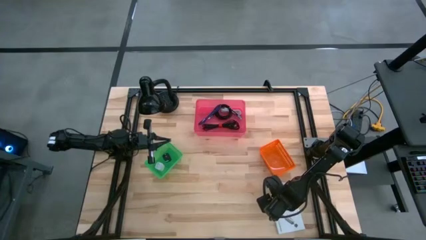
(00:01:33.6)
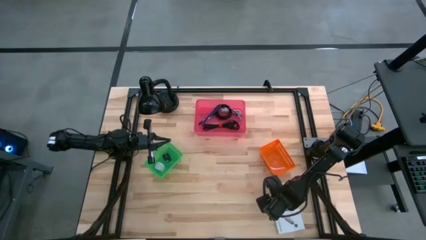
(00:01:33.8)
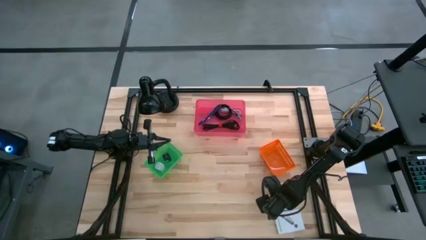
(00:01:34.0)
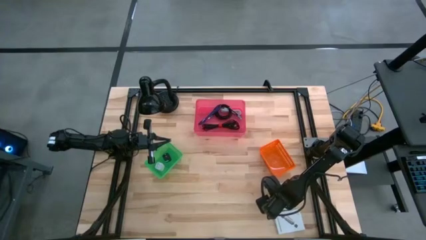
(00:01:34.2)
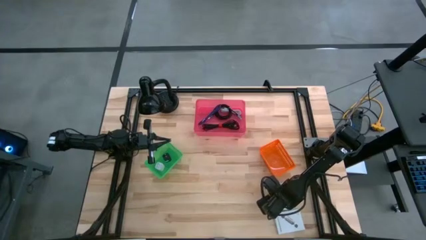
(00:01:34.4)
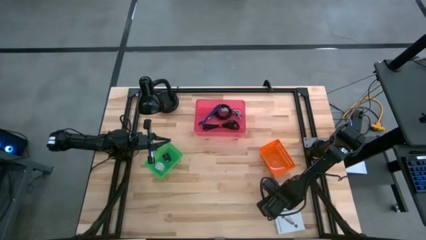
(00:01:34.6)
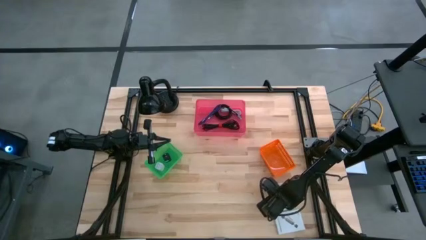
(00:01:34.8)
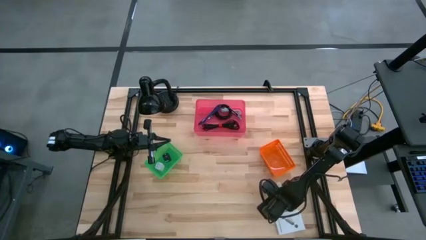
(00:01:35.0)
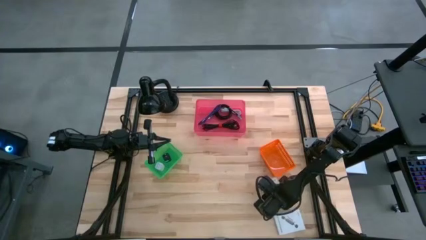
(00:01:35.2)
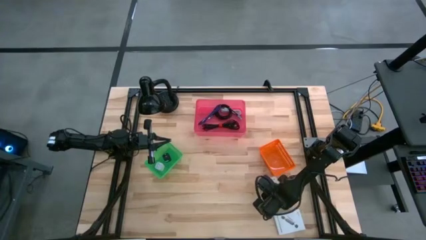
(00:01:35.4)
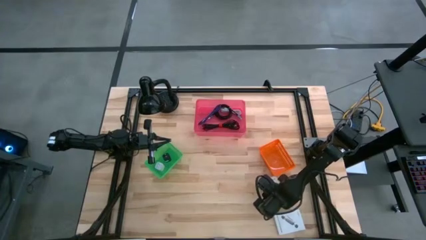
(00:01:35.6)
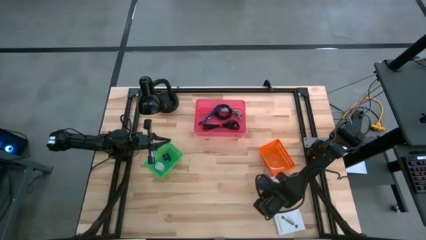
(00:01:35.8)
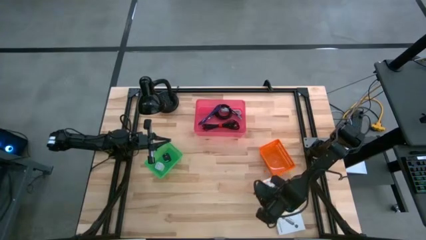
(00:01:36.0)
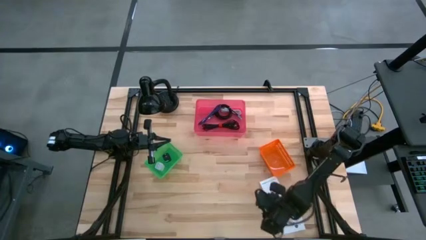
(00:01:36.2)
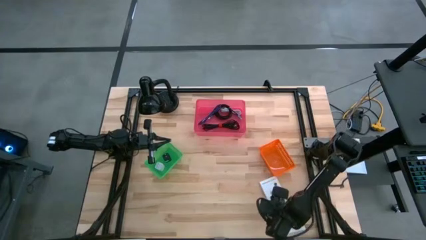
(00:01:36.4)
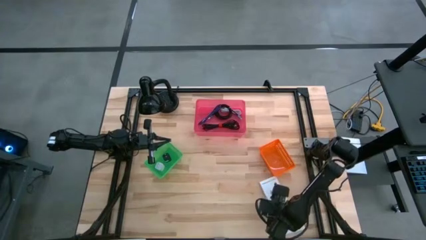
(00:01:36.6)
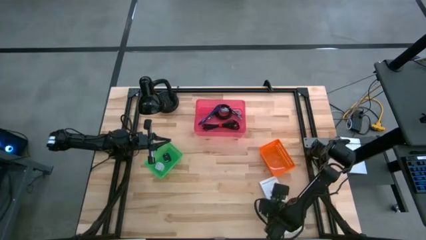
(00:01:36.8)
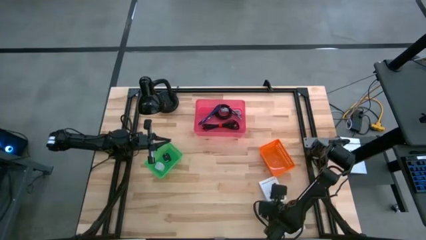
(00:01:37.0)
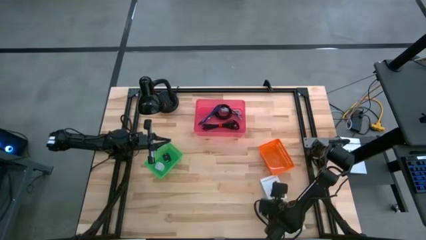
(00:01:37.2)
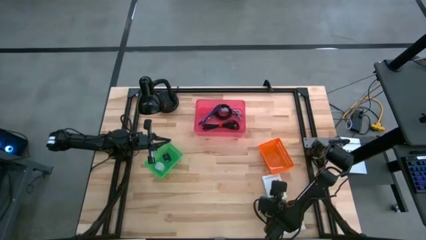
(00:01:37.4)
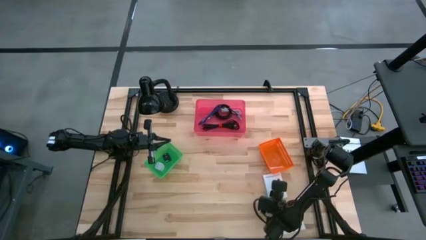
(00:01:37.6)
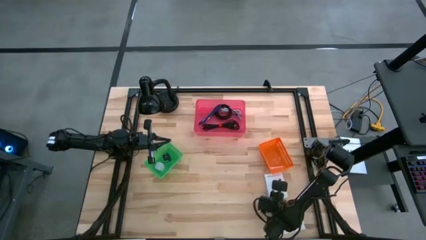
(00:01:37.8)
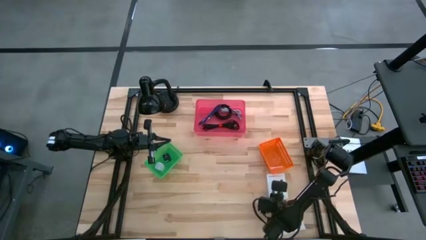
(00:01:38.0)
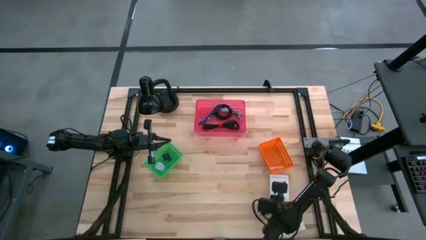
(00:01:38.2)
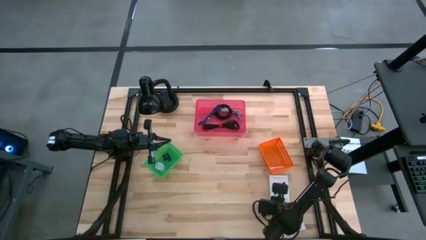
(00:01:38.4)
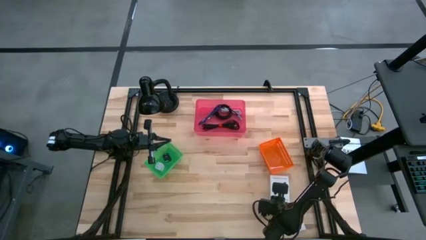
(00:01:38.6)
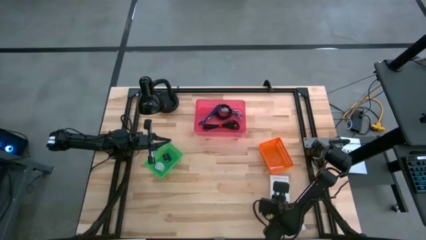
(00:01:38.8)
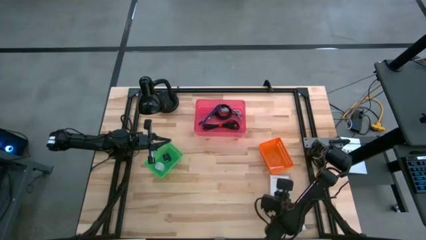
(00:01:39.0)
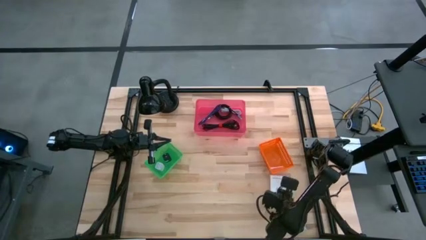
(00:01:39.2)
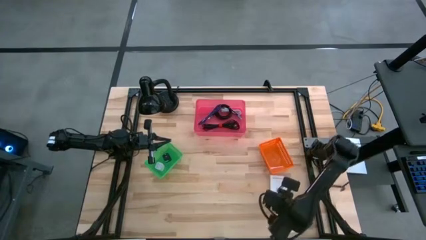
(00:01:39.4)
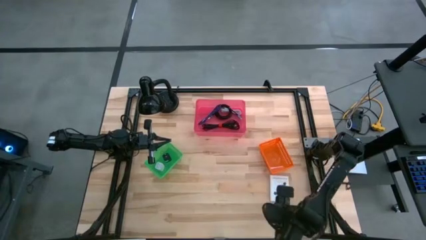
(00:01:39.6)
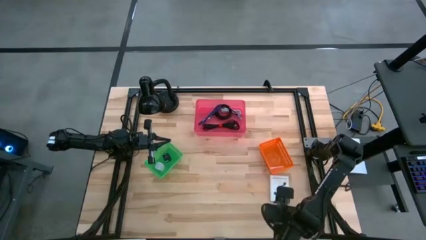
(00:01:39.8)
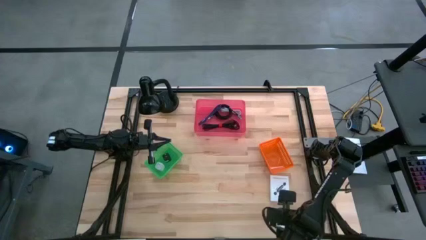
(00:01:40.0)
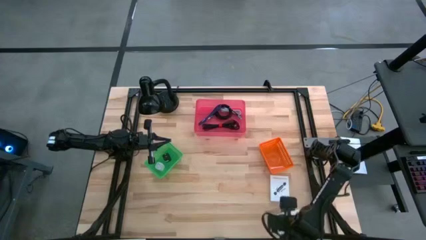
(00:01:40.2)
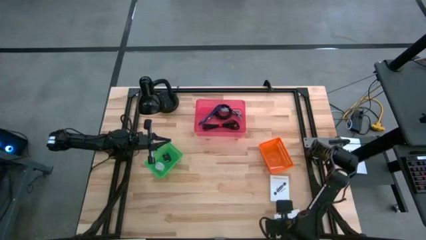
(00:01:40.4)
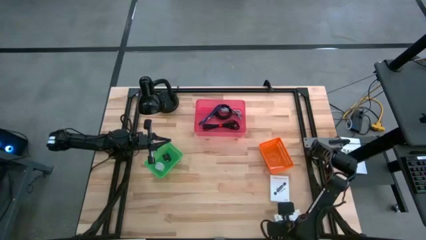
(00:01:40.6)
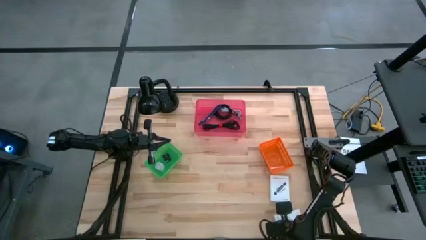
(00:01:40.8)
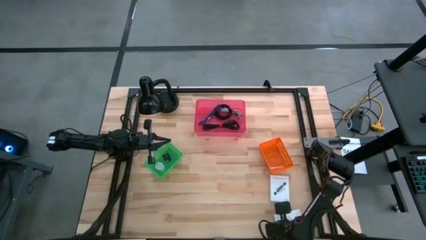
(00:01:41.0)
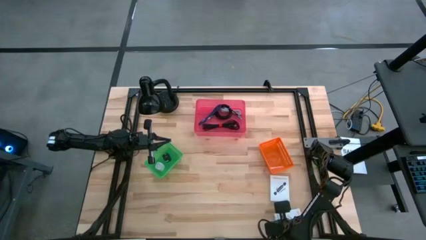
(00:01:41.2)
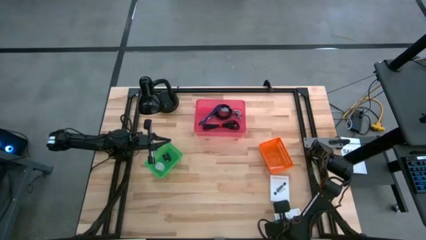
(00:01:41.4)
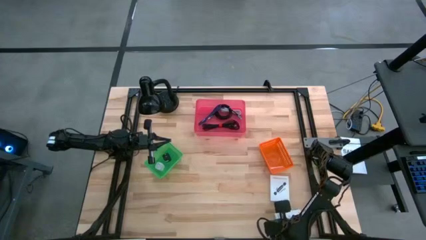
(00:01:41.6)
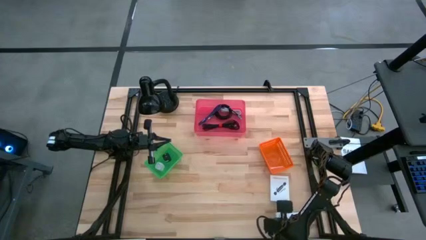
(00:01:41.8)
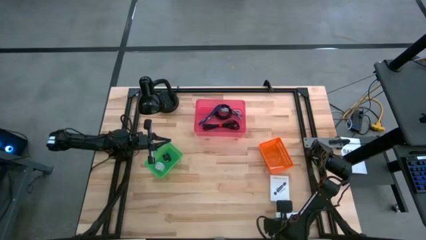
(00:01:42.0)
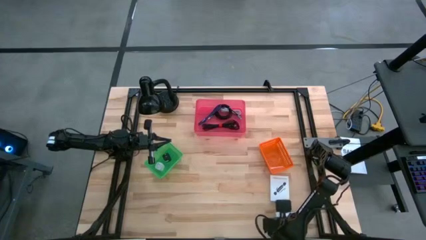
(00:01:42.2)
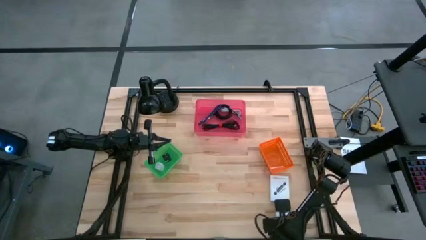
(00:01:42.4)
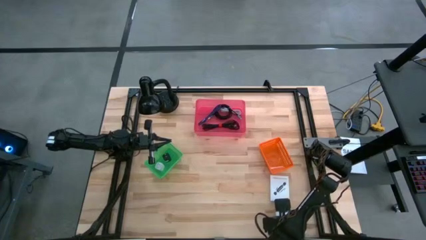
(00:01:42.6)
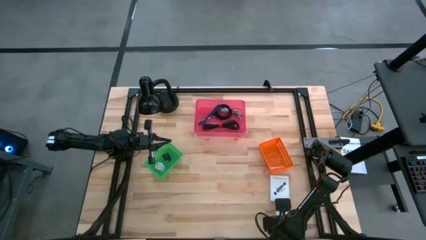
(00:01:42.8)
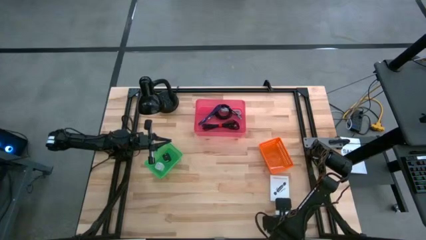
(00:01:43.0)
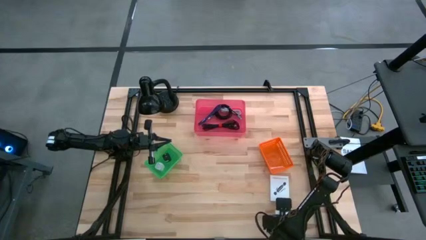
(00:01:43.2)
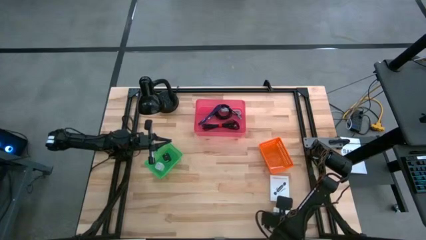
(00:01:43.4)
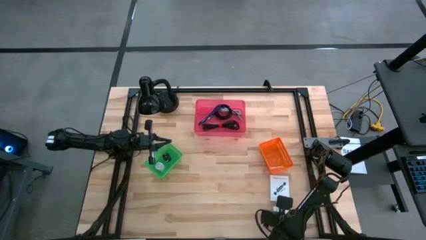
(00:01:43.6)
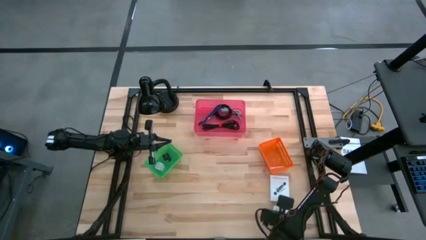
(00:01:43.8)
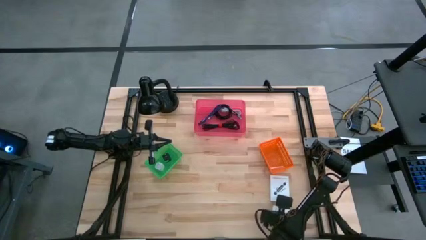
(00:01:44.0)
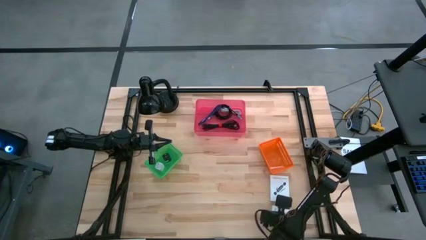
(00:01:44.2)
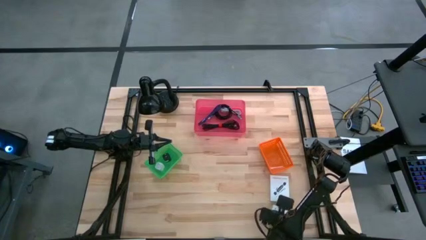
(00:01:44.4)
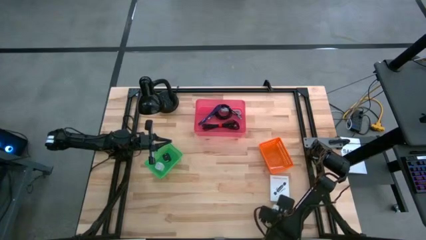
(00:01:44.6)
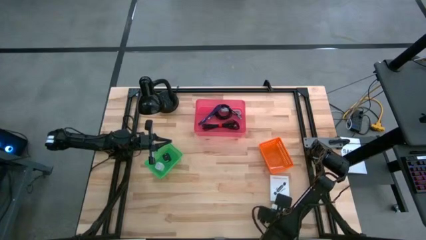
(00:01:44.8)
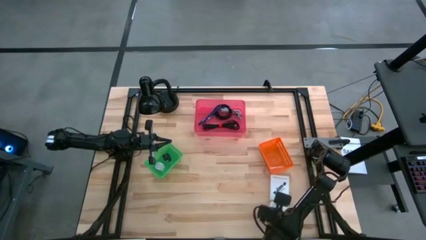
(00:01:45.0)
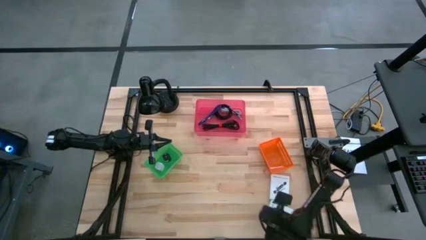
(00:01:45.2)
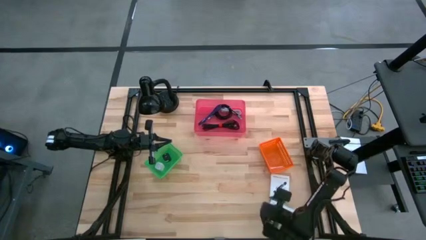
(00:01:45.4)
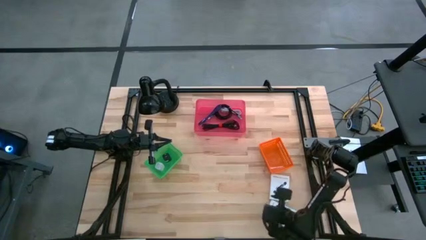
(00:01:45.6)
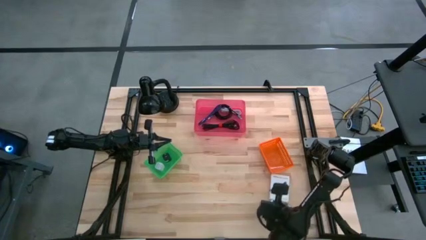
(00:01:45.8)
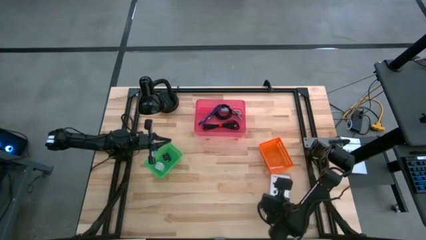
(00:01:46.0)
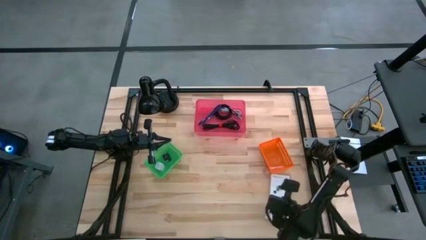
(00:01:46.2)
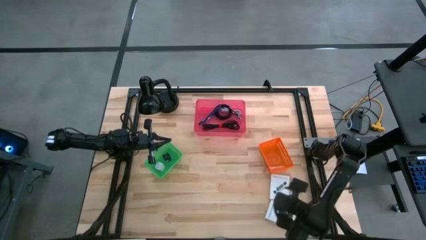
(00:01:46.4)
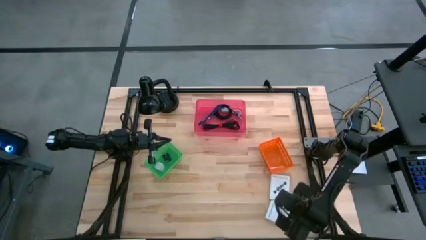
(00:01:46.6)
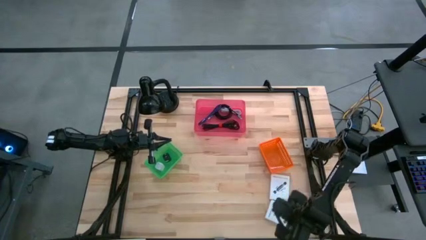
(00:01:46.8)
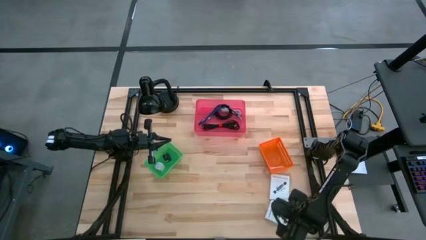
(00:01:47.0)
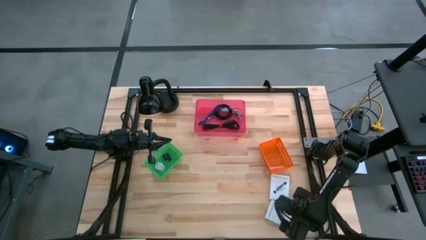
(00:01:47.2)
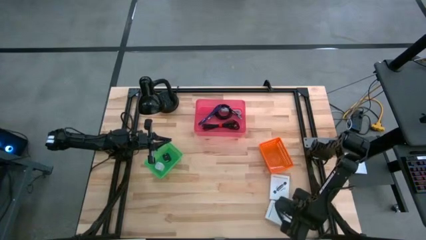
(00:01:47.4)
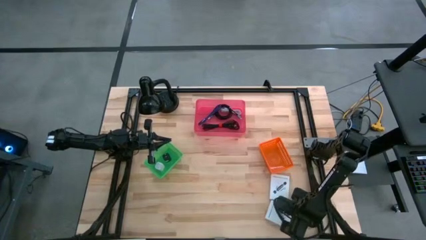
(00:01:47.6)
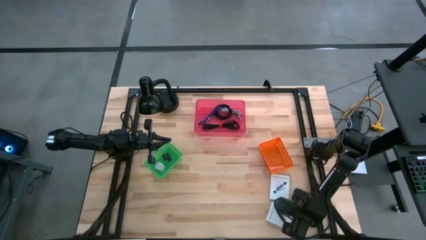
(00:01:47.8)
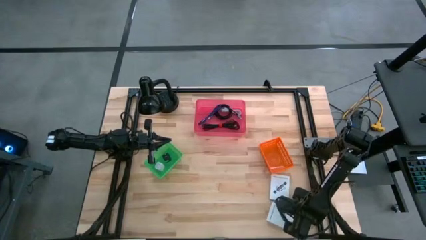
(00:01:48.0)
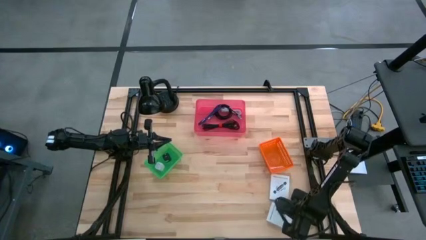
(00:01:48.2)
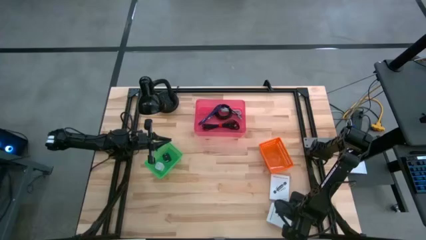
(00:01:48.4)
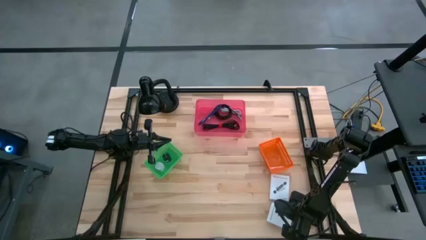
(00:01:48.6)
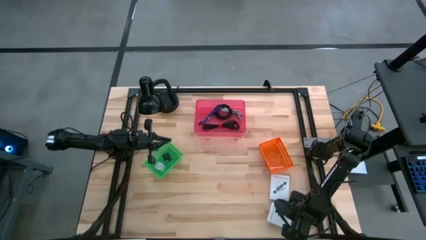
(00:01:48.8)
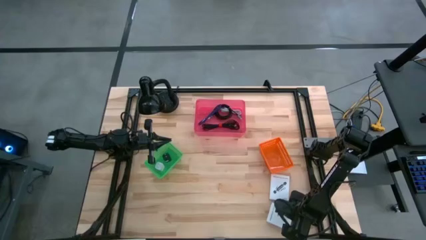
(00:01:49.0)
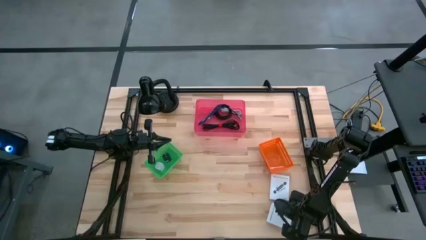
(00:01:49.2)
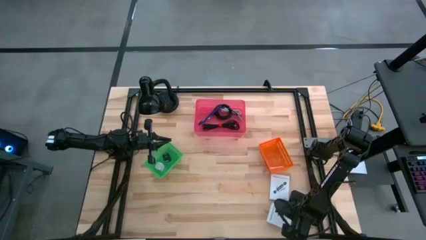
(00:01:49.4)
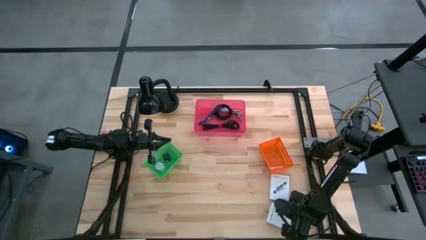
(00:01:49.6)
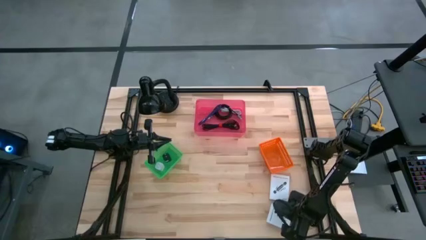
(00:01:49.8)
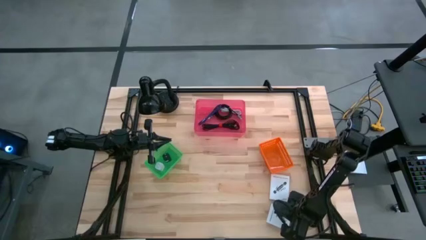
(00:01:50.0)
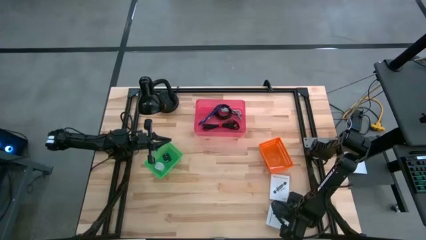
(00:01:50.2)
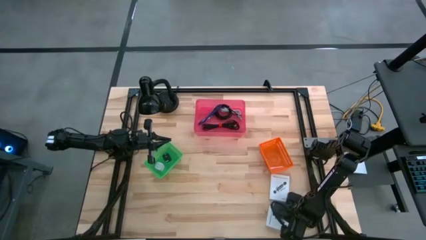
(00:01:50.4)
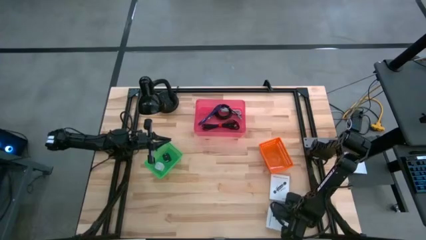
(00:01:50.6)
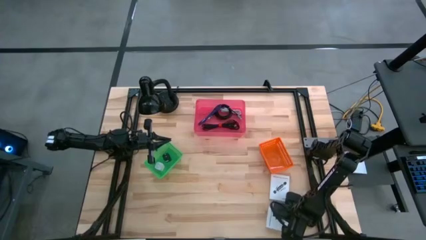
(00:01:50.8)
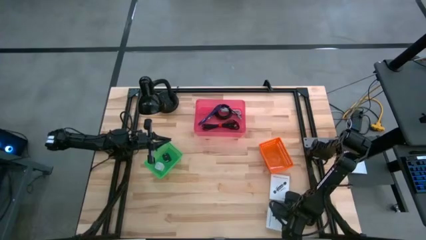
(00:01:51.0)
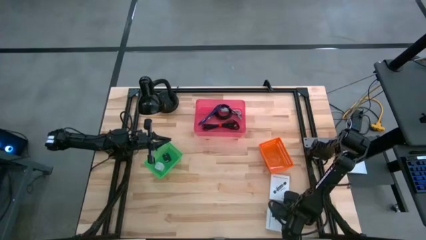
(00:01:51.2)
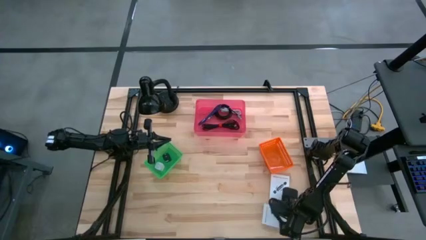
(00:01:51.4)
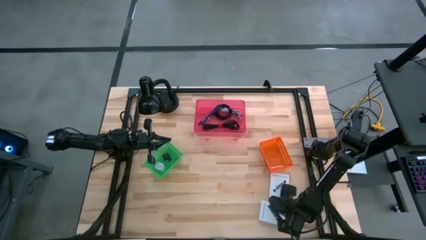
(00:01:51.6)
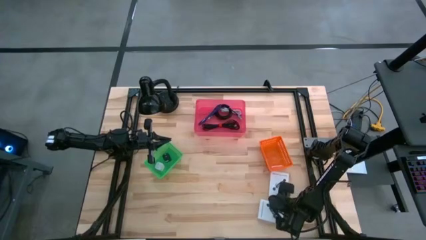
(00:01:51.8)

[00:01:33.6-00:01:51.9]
Task: Pick and place items into bin
Put the top card reader box into the orange bin
